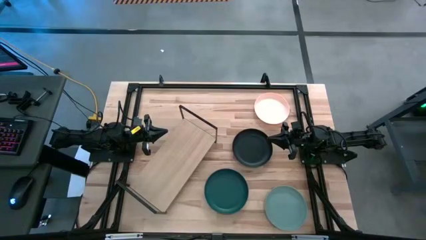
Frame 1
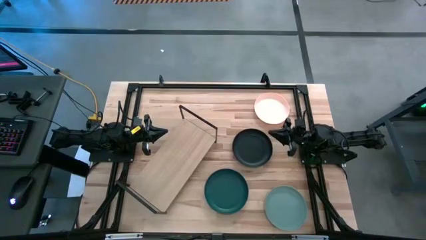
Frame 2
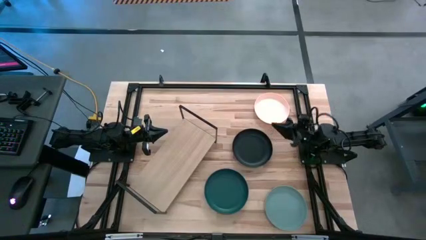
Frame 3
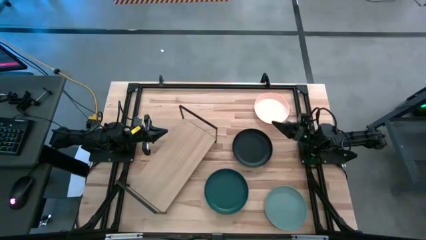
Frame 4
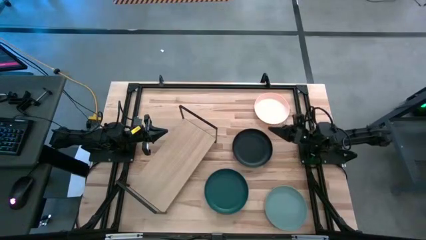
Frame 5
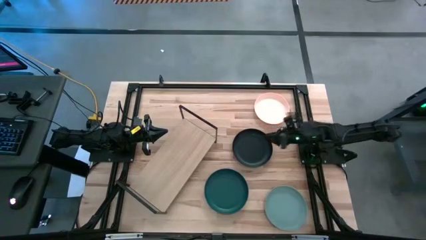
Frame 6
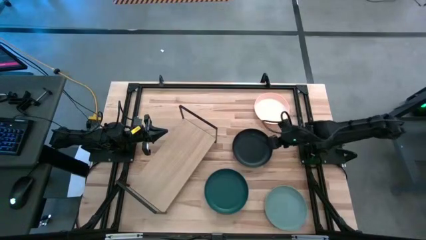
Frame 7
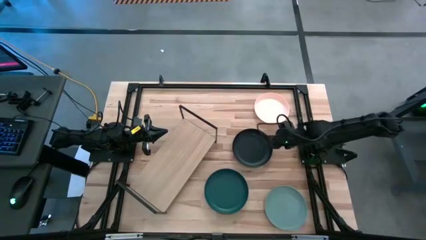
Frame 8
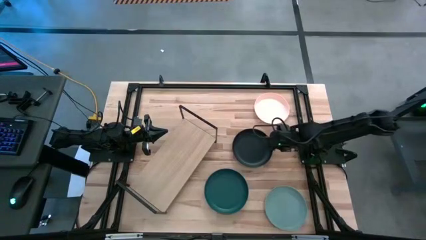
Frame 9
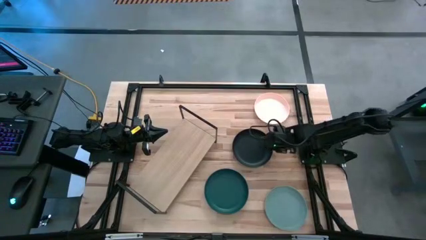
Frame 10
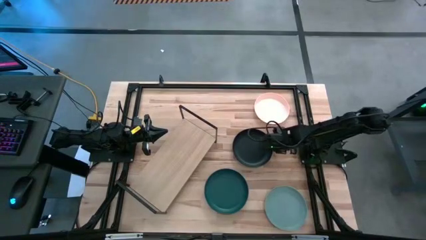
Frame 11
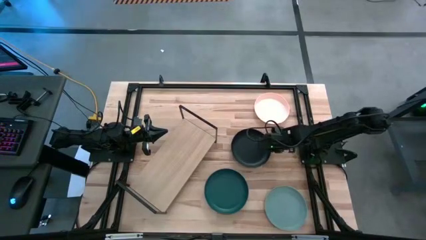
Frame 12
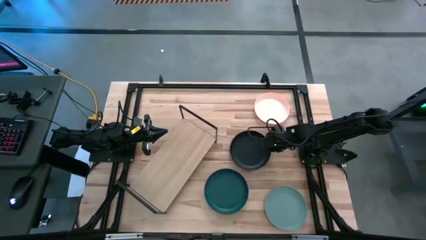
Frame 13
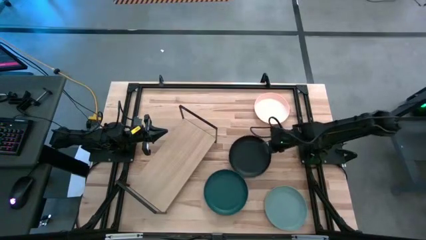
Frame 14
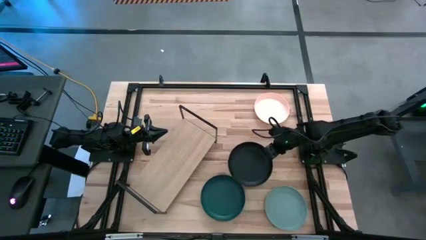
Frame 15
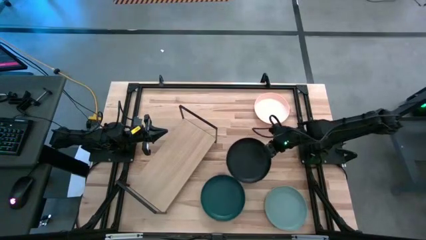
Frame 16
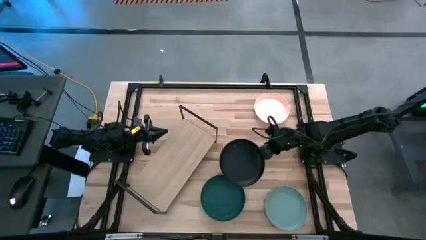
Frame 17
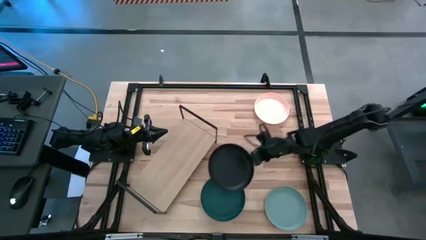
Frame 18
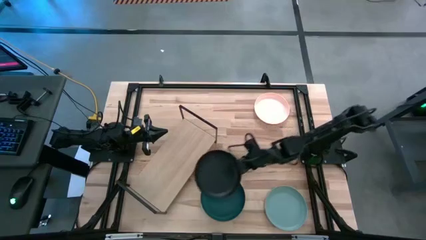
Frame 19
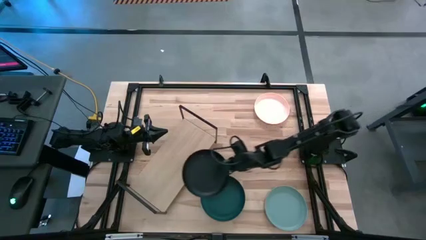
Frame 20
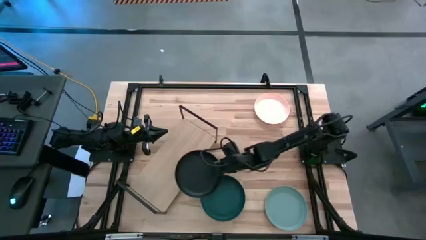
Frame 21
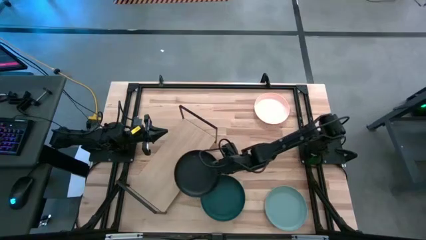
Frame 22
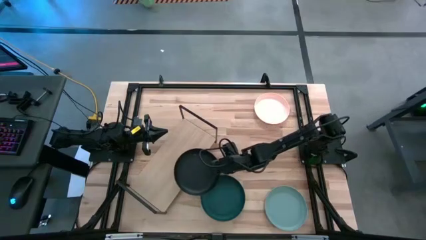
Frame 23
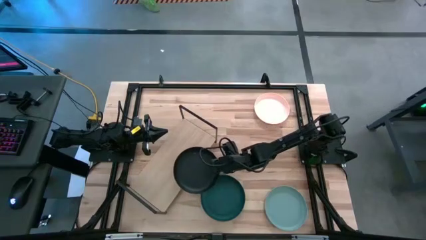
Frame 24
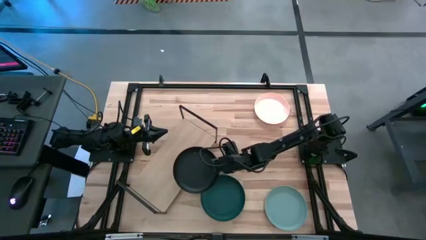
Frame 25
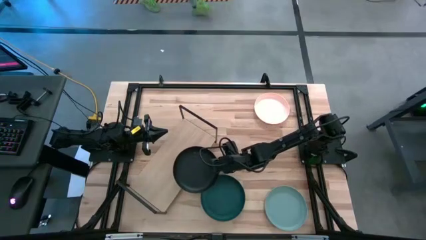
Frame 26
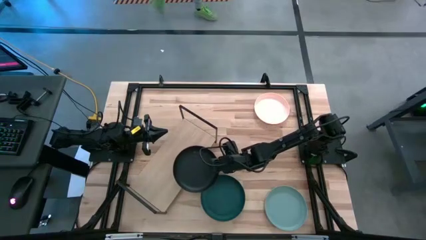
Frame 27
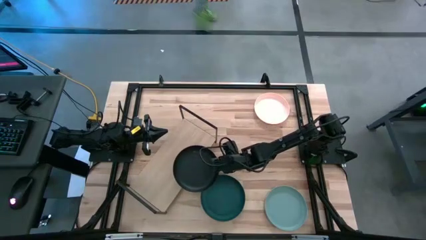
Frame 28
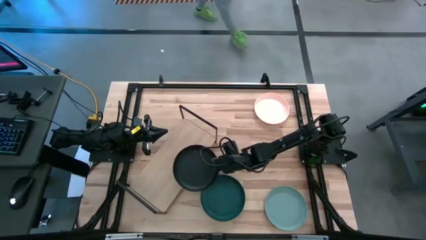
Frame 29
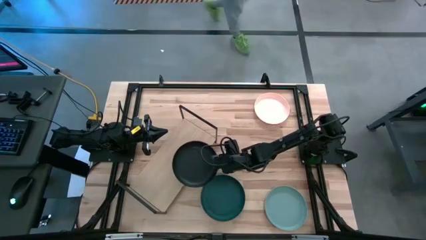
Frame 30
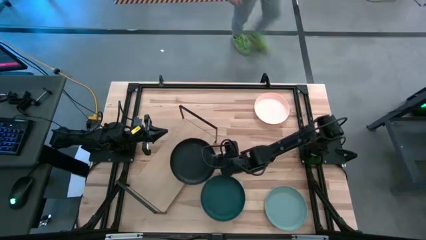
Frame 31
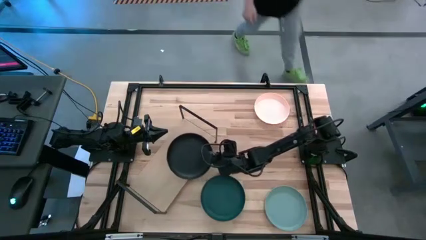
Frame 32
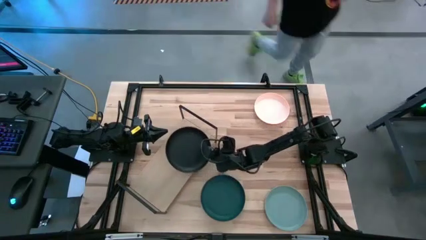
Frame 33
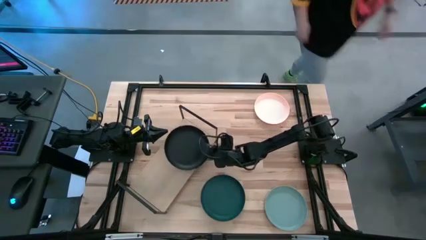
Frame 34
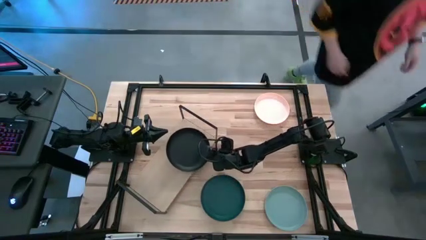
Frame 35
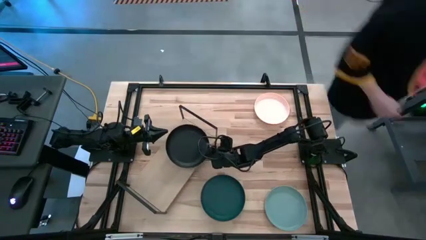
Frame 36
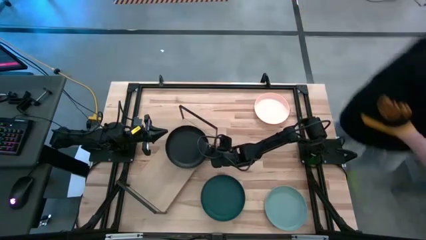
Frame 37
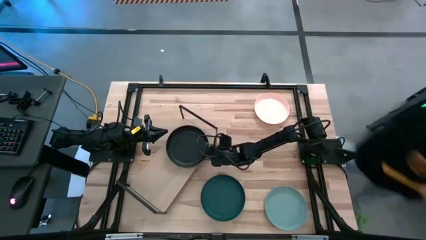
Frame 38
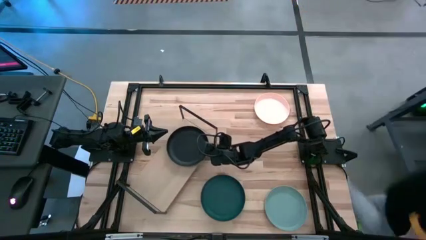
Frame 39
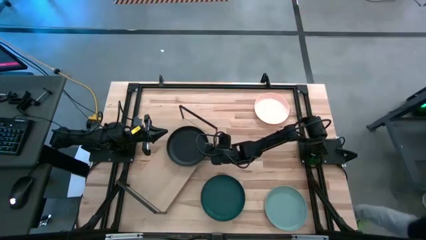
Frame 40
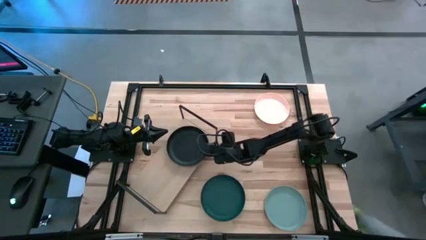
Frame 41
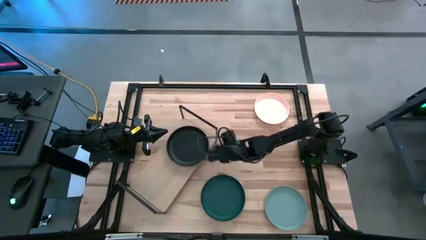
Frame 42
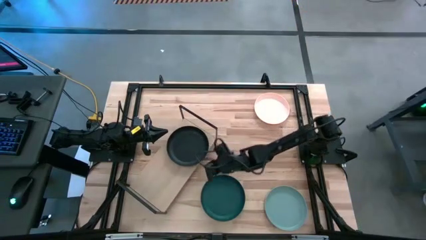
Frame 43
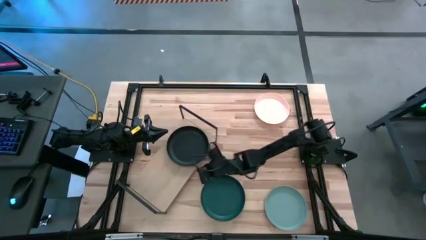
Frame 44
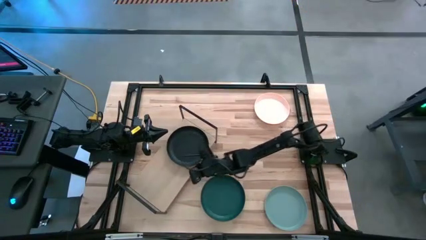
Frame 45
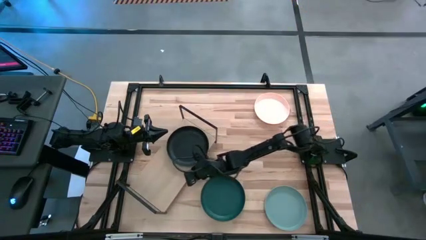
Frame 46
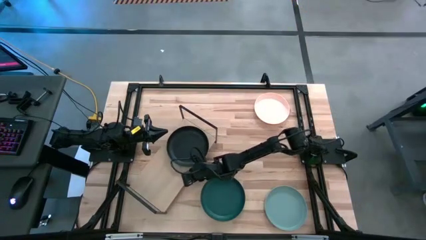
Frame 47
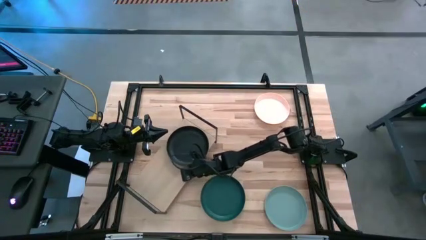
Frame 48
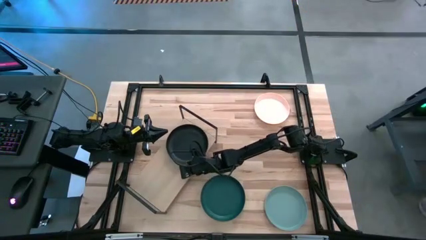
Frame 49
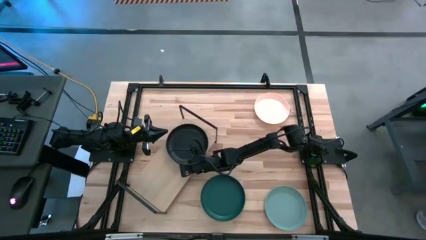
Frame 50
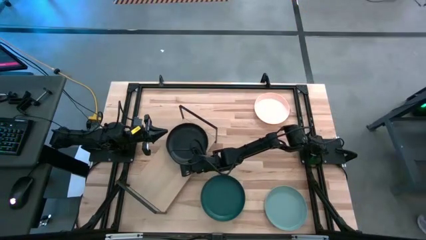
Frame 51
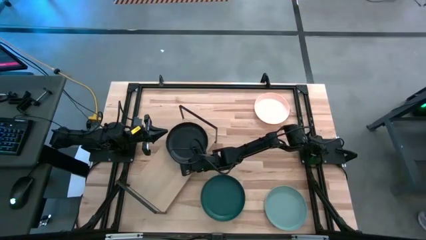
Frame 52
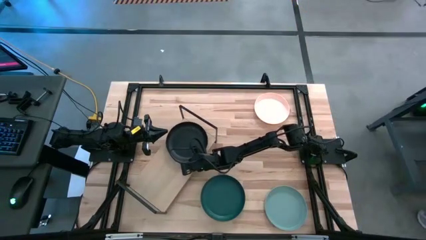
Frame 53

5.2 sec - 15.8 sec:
Task: Place and stack plates onto a shelf
Put the black plate on the shelf

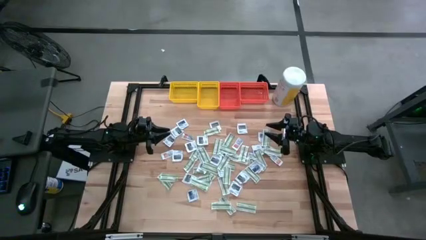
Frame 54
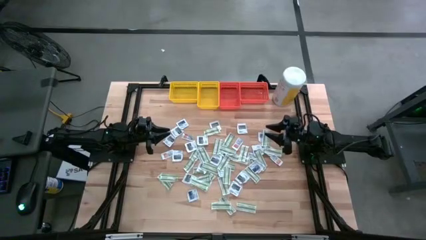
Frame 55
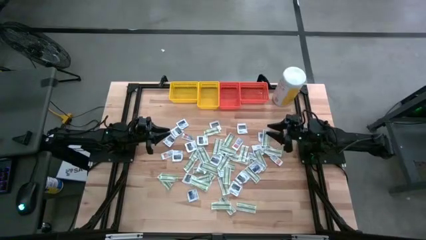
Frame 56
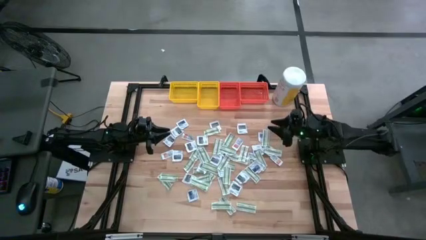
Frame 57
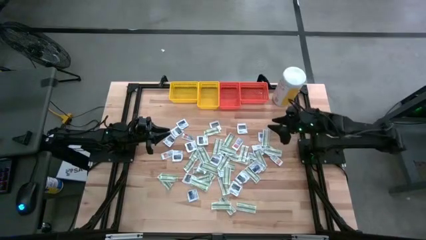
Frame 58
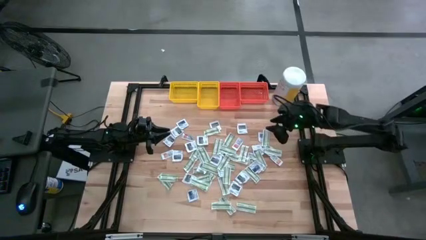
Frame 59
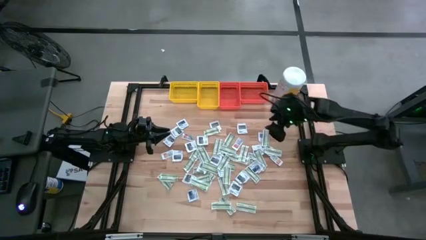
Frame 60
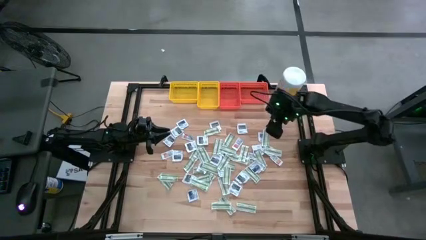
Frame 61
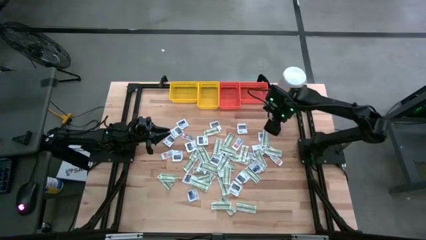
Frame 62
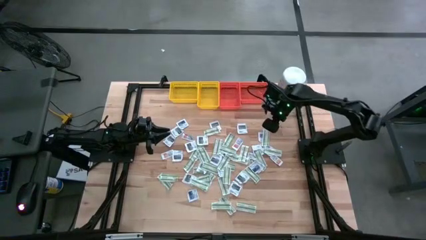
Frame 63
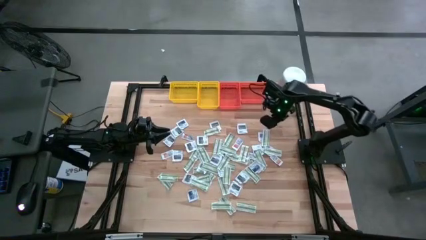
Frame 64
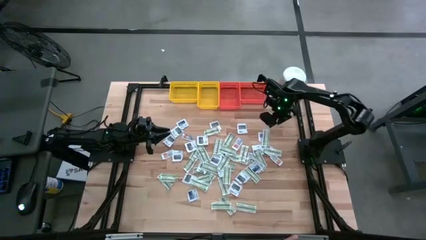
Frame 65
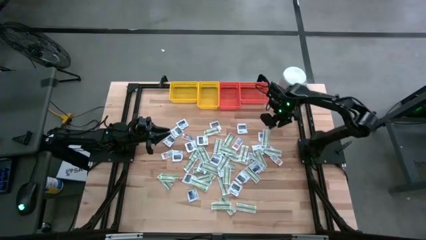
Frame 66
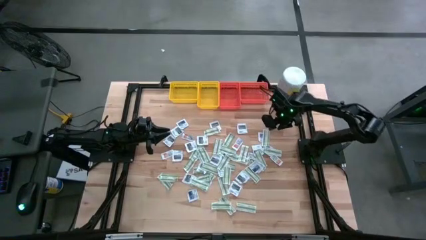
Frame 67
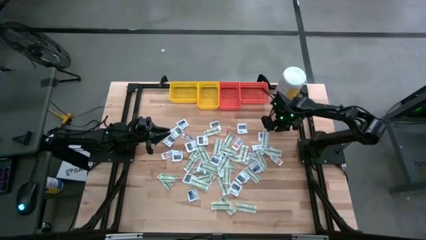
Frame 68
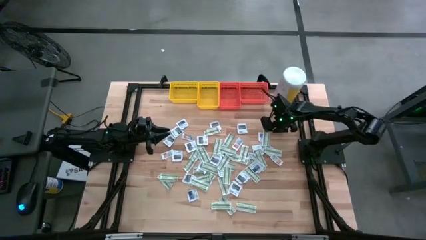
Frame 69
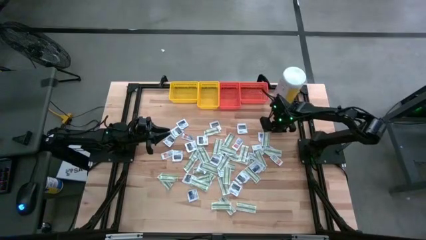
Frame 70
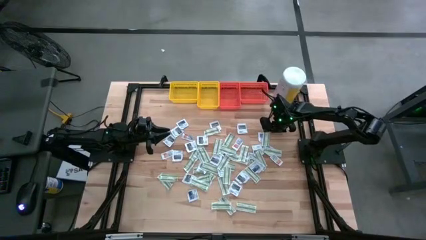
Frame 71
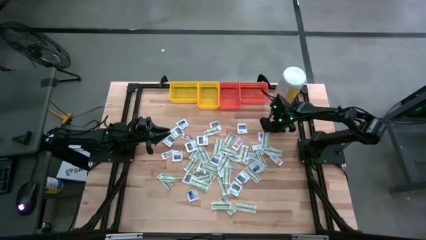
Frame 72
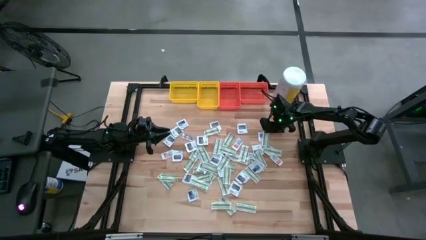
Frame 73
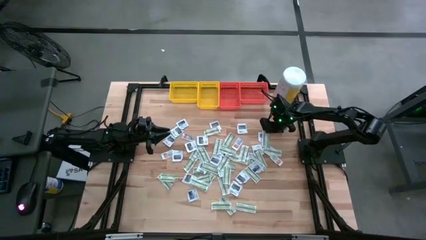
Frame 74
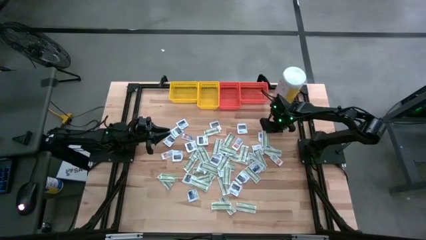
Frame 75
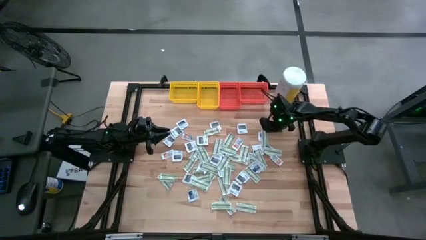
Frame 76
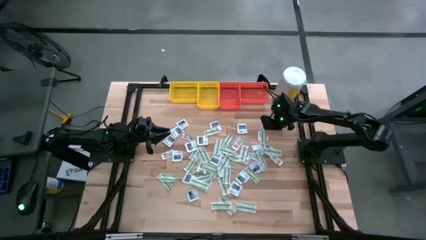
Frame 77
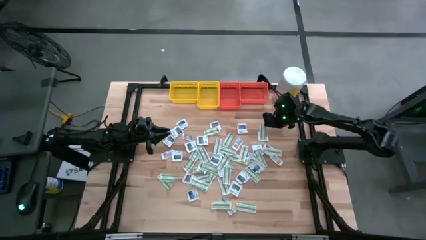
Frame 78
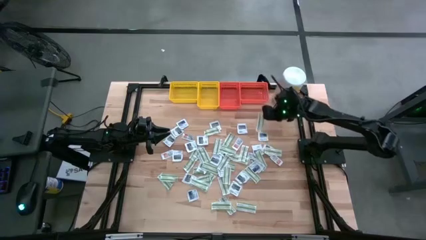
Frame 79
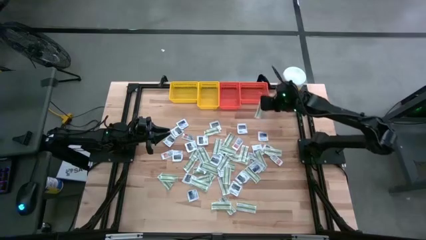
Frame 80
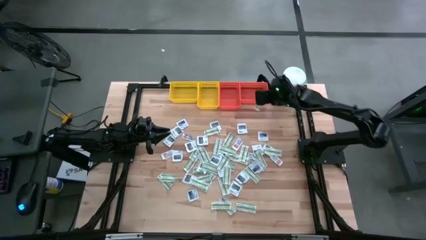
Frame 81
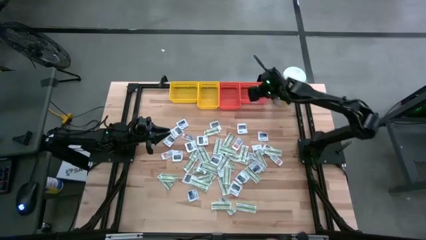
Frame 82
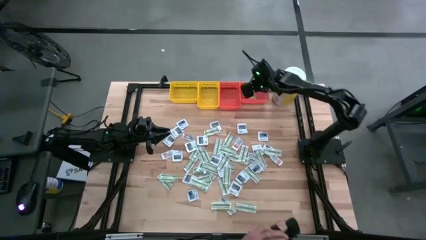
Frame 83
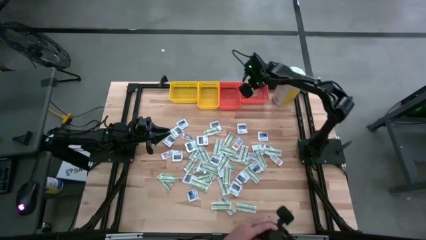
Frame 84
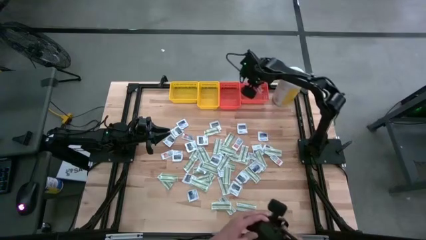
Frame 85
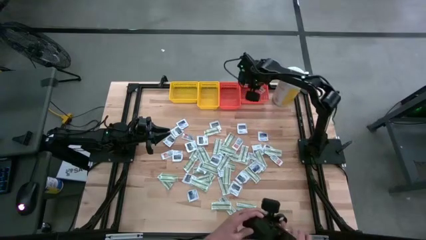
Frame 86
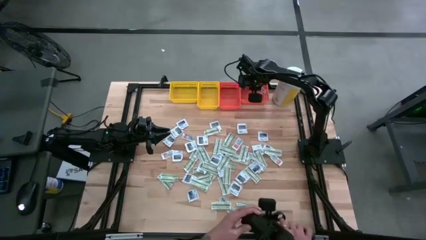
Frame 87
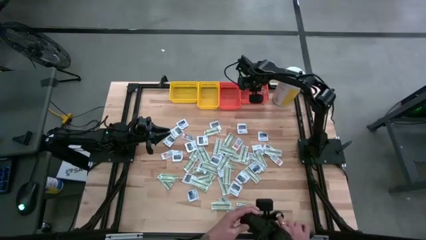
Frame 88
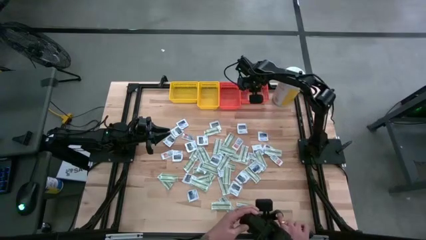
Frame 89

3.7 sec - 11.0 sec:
Task: Pick & Place First Aid Supplies
Put the green pad into the right orange bin
